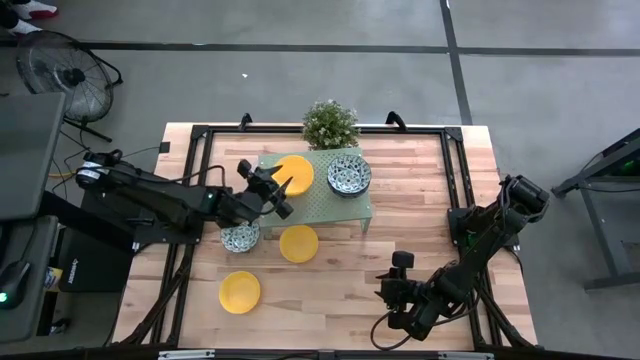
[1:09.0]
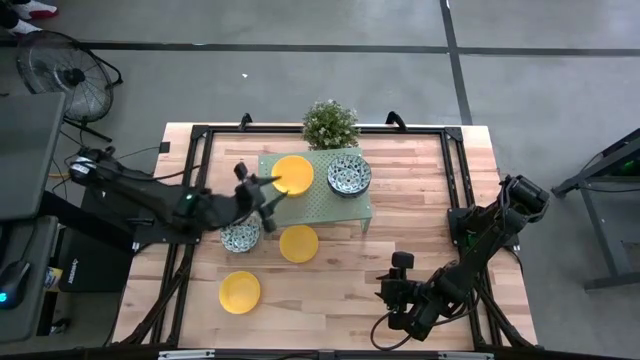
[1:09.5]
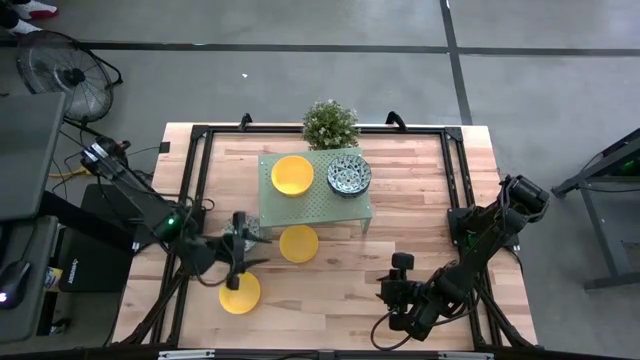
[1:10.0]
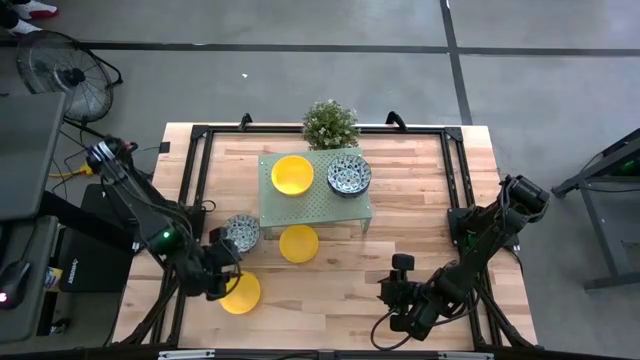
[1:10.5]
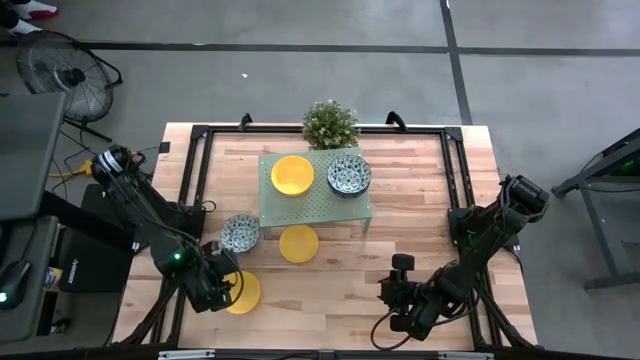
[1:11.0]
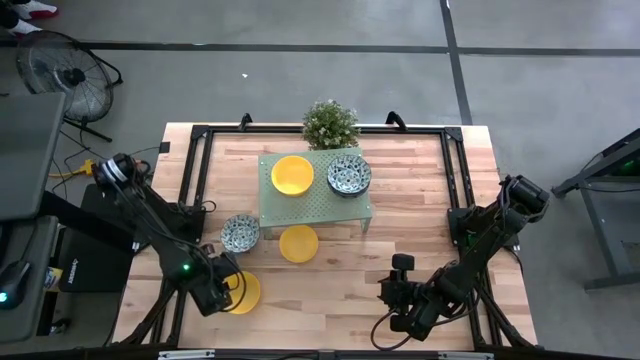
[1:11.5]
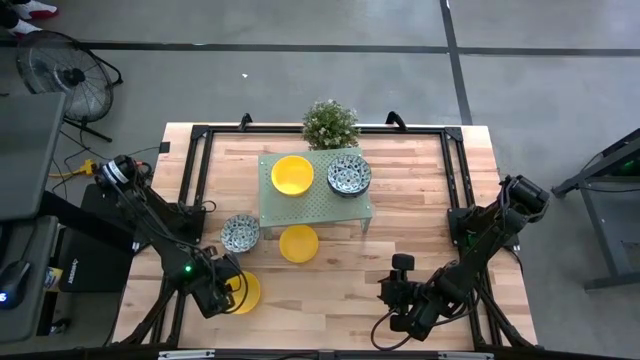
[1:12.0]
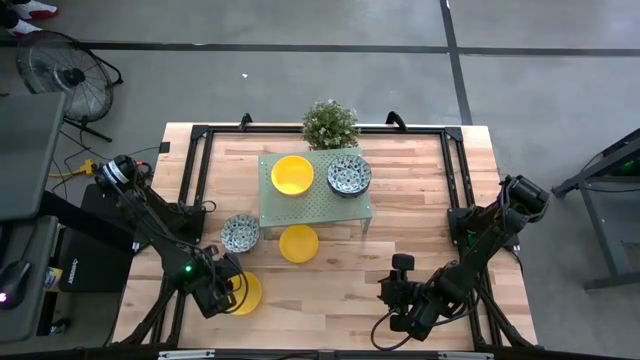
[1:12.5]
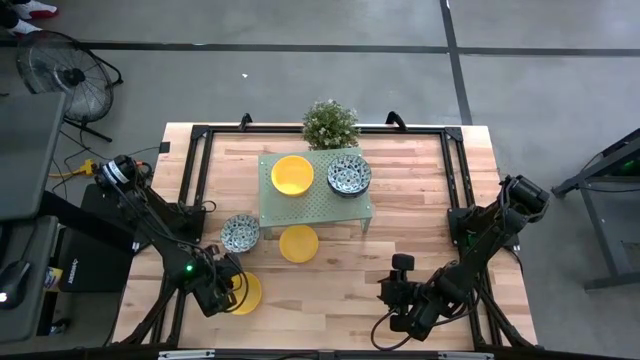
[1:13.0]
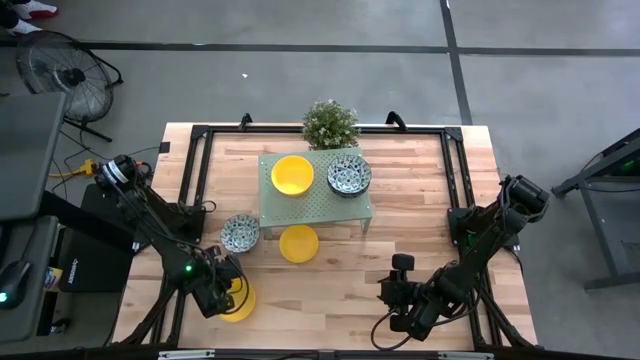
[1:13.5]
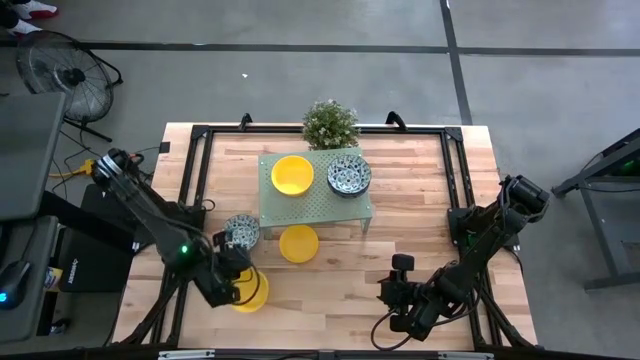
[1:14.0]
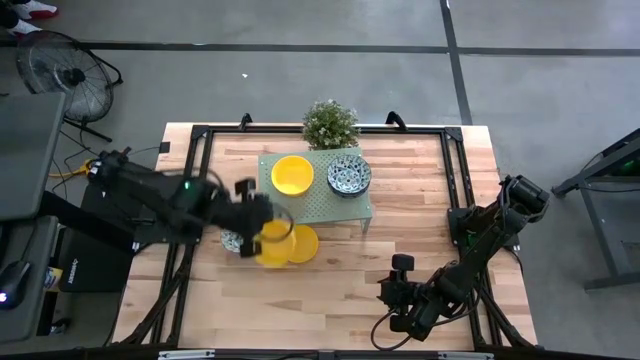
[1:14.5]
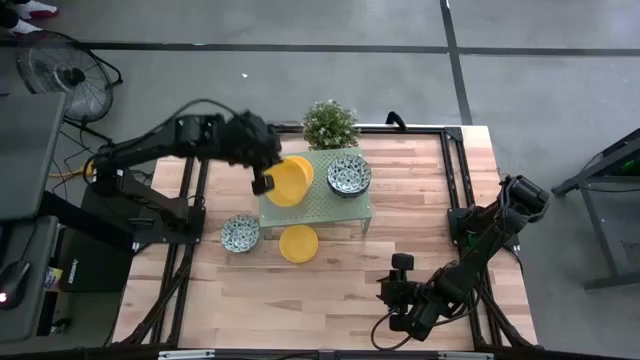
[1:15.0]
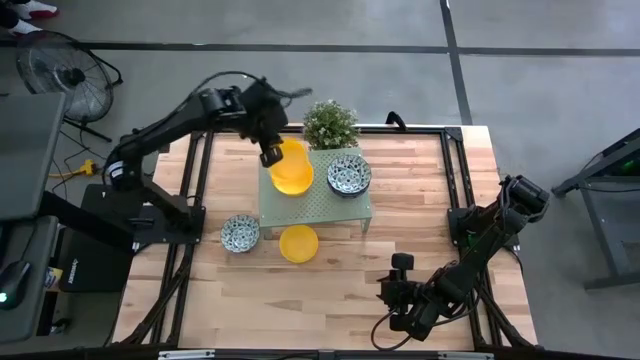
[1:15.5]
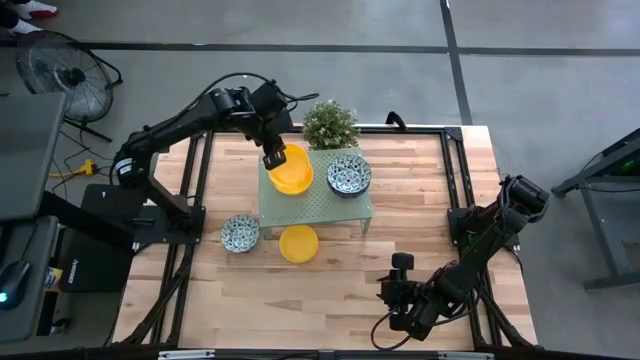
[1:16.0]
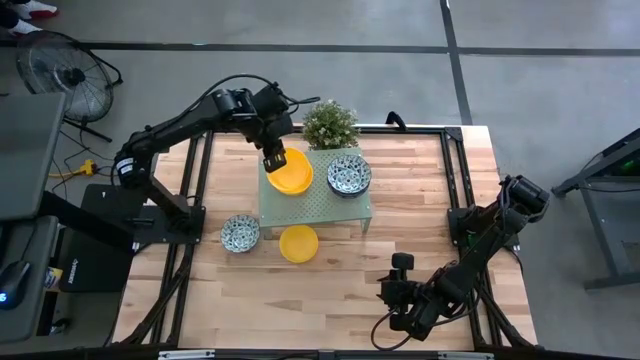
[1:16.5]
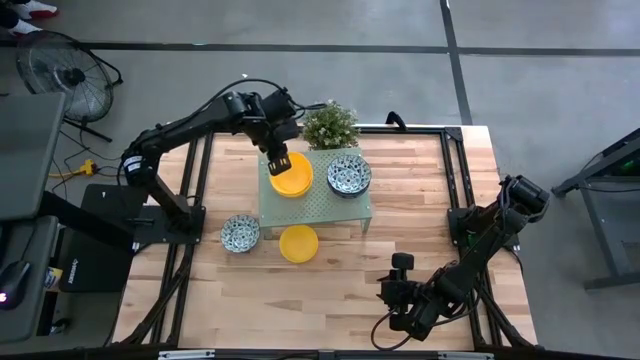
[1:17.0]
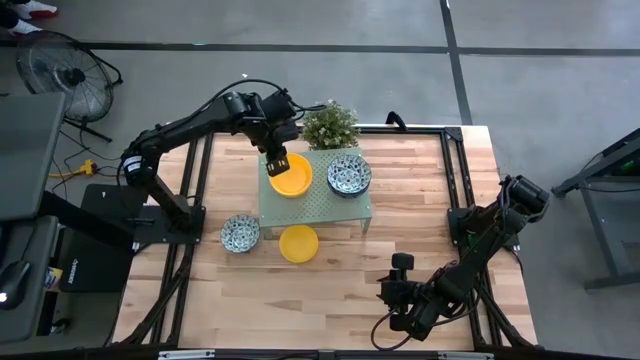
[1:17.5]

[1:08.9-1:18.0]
Task: Pick & Place Mini bowls
Stack the yellow bowl on top of the yellow bowl on the shelf
